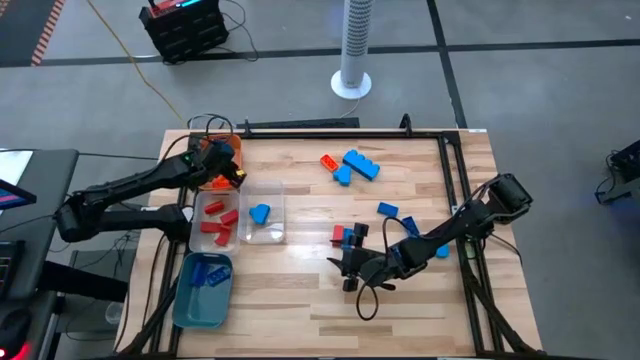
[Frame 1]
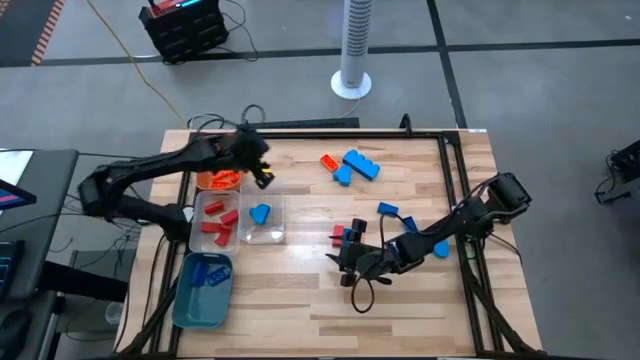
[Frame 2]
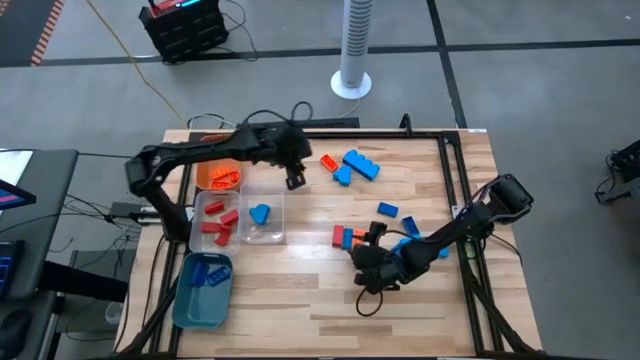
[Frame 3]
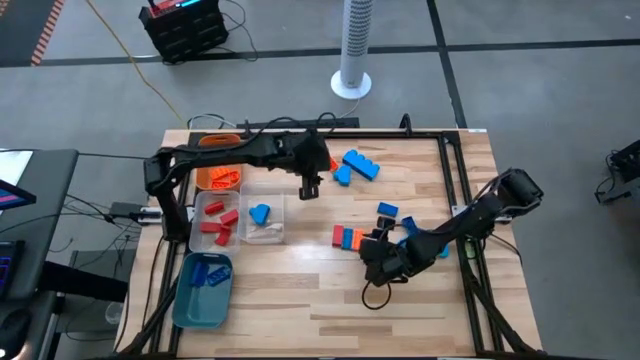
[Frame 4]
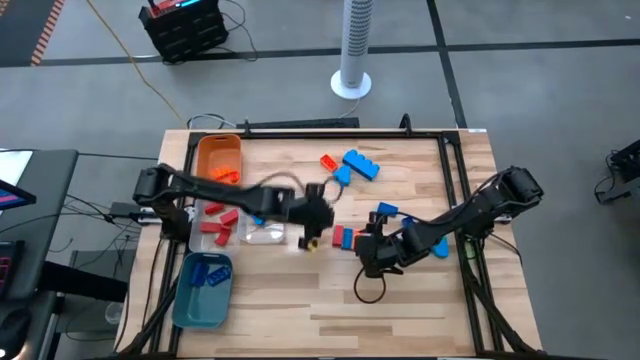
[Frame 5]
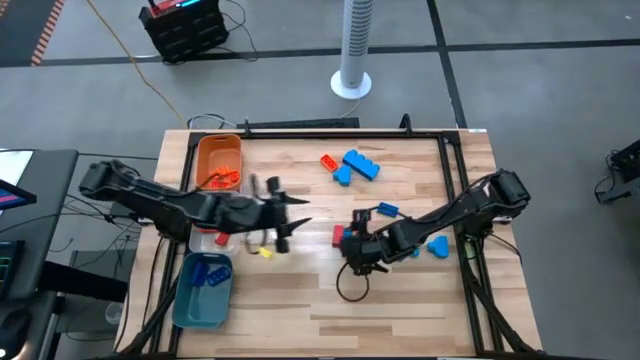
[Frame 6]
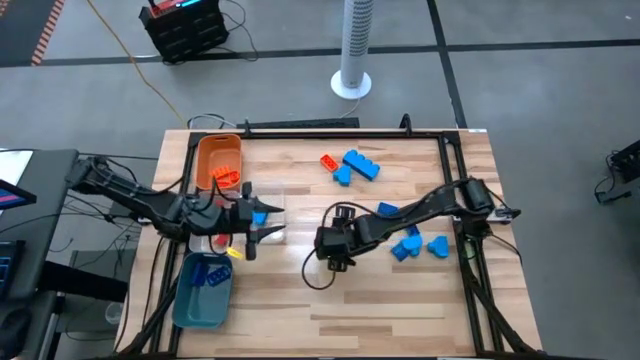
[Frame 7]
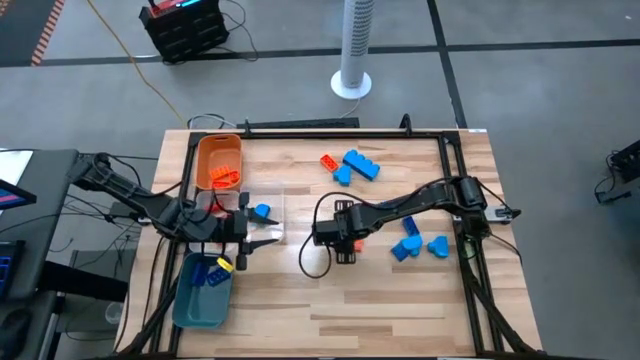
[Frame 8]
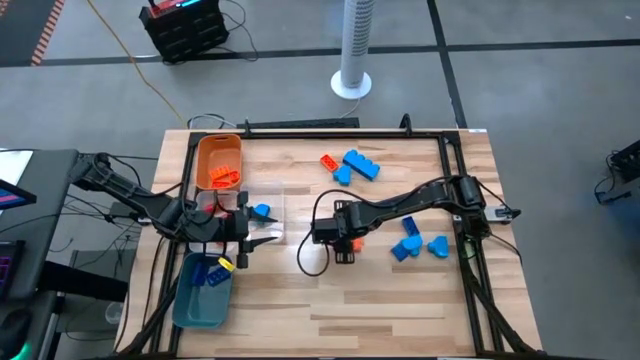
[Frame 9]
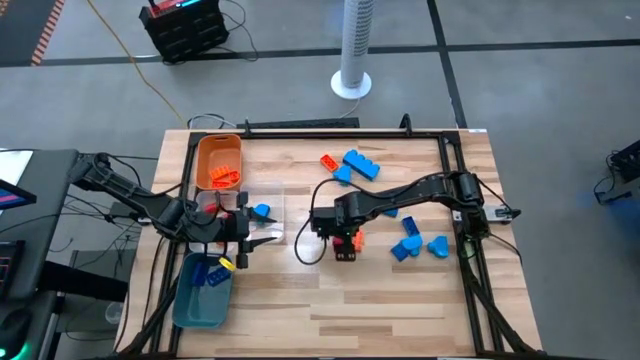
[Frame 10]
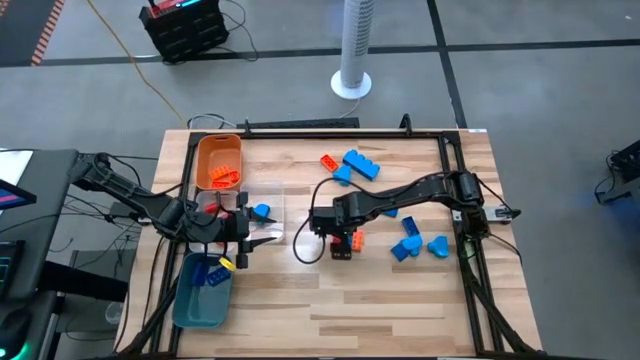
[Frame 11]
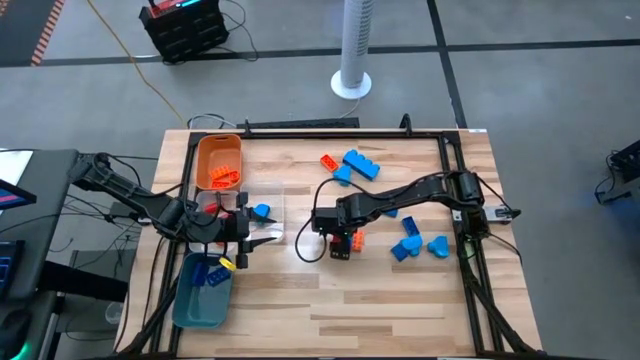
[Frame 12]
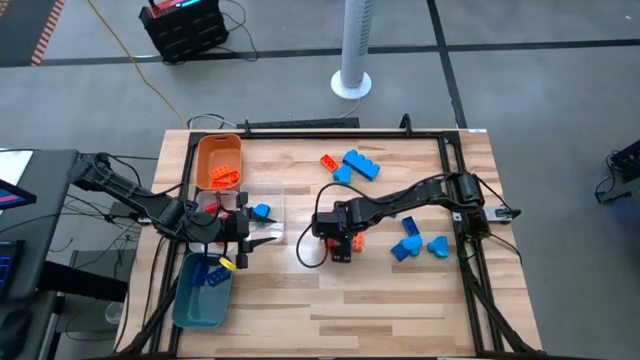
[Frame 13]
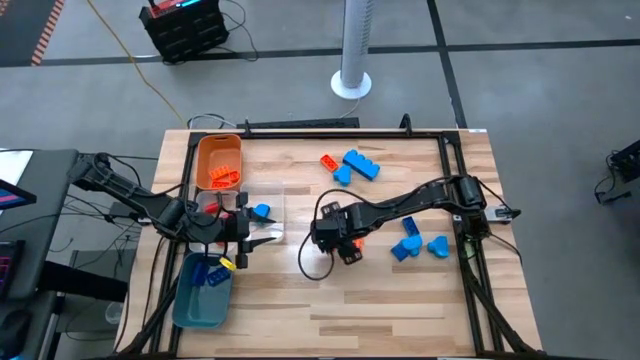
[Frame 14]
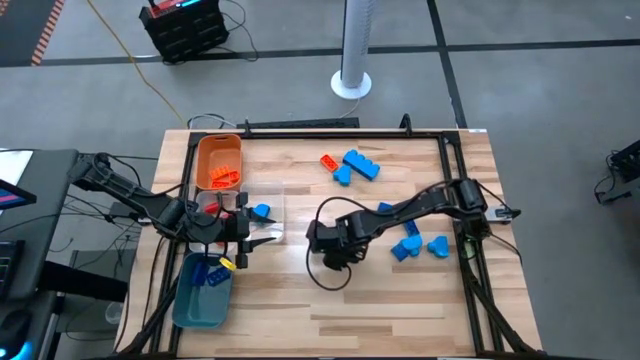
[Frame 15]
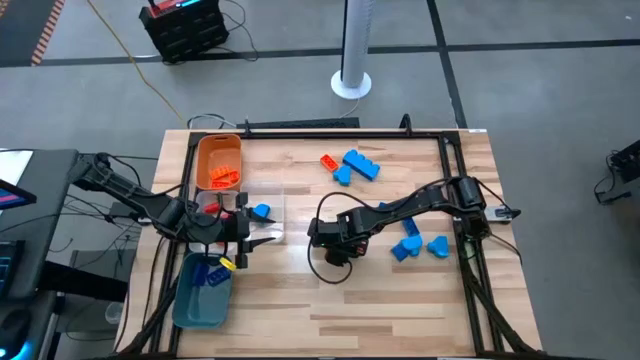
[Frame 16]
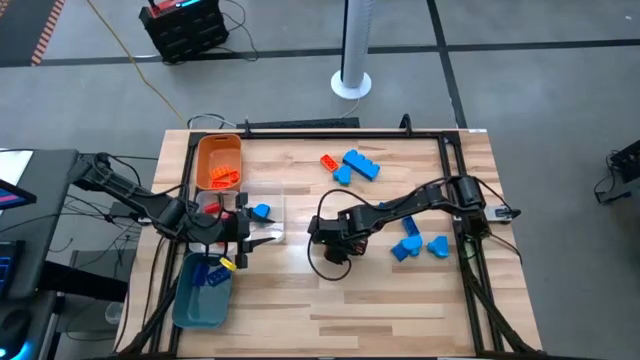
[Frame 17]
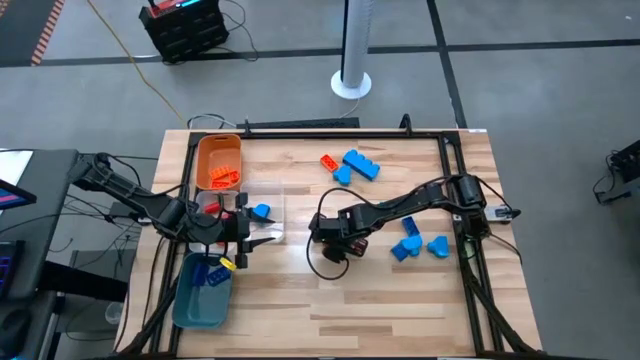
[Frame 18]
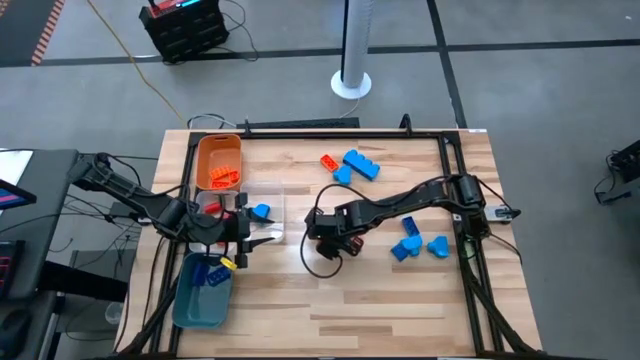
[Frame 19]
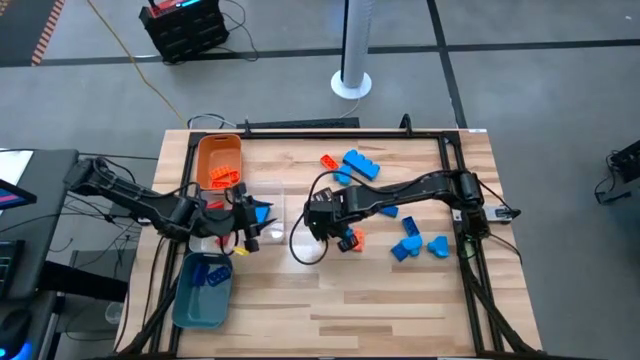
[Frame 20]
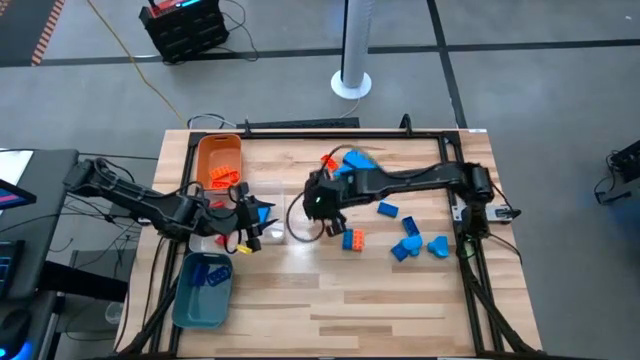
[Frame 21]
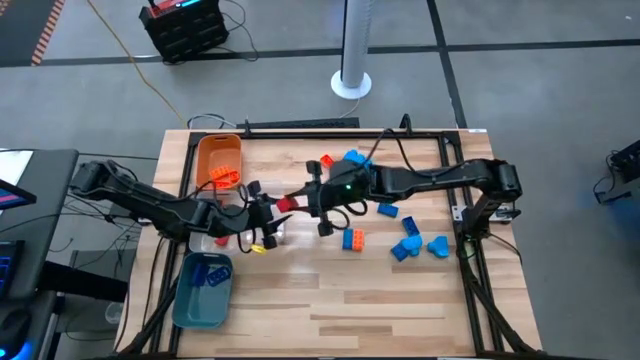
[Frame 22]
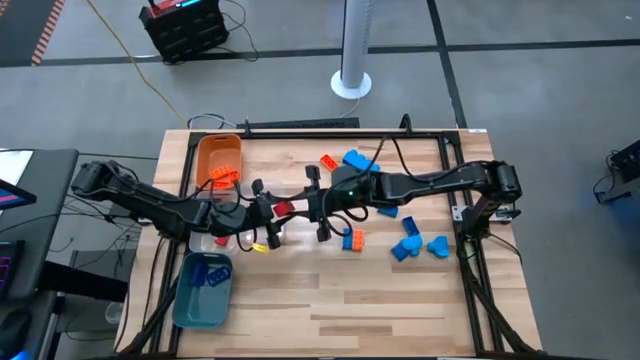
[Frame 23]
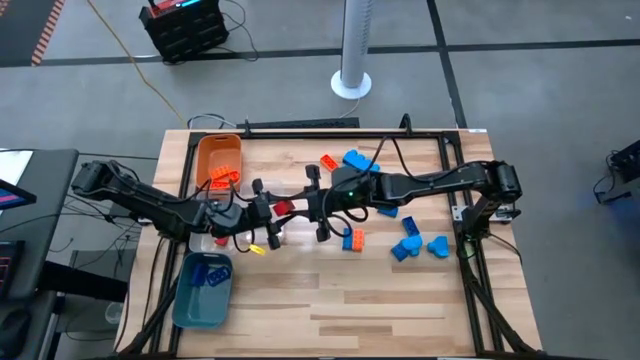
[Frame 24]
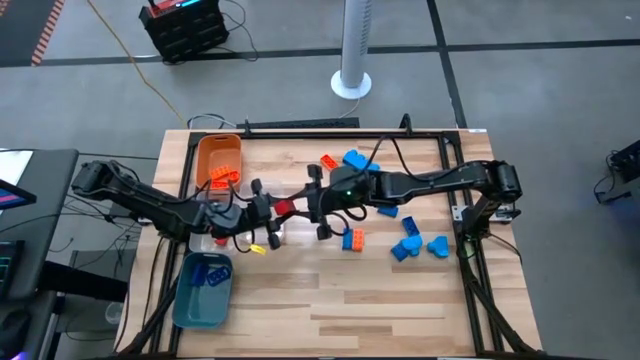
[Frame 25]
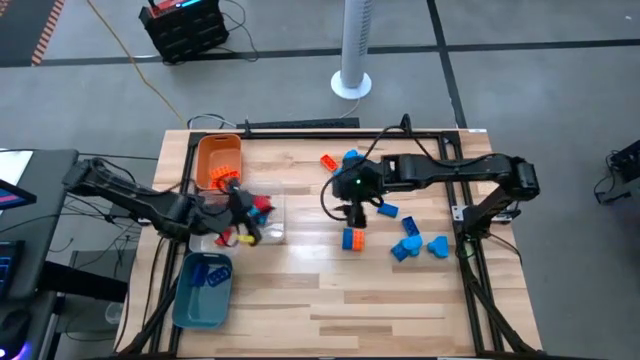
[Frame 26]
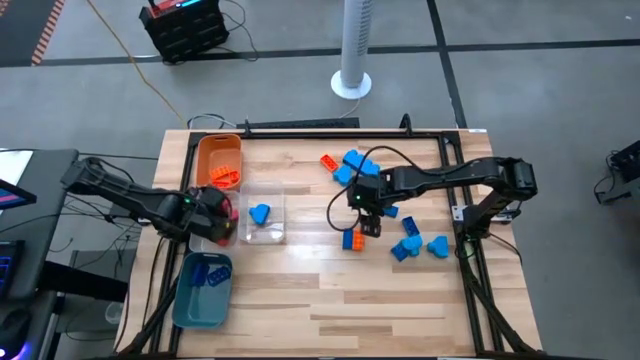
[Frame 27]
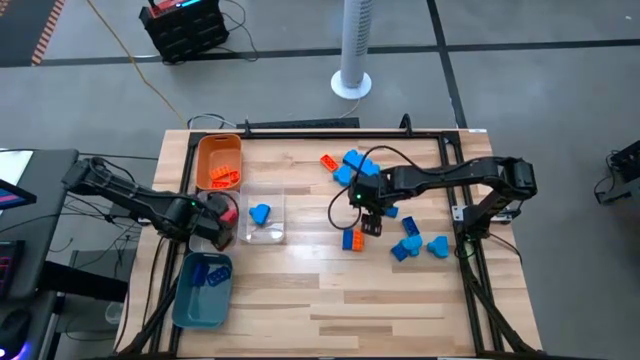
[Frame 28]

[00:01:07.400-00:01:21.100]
Task: Sort blocks
Put the red block into the left transparent bin

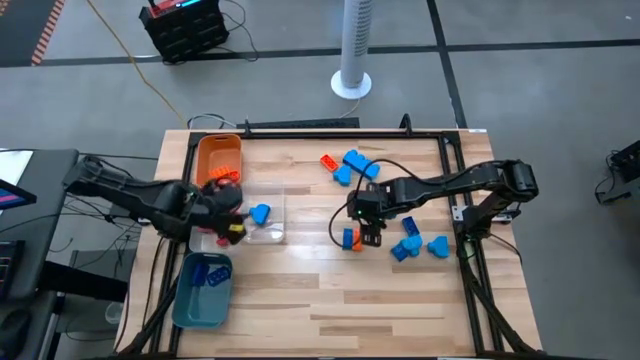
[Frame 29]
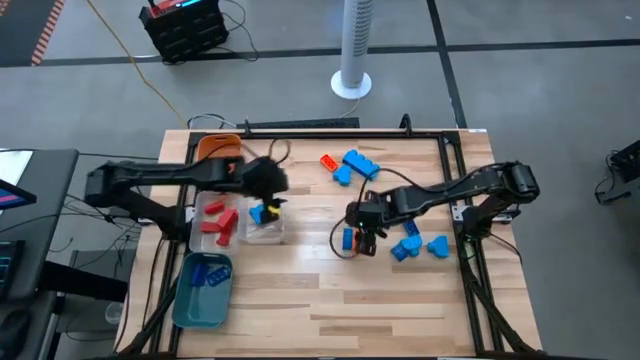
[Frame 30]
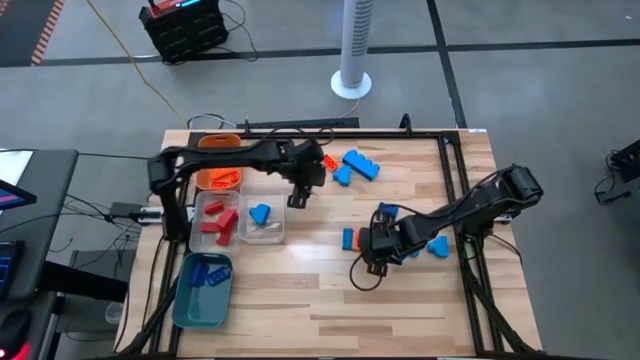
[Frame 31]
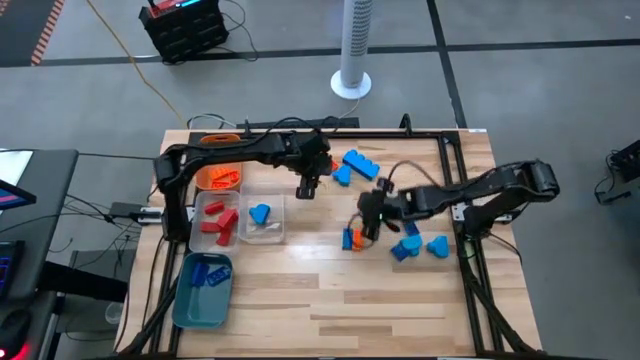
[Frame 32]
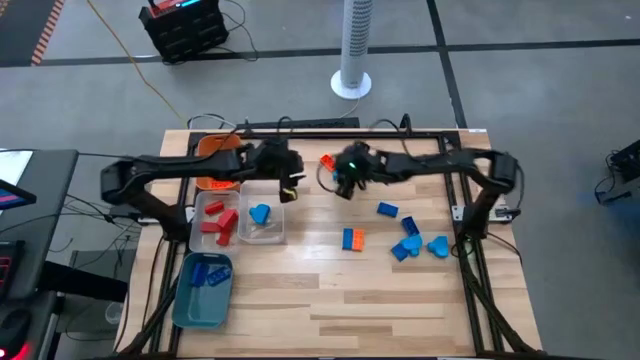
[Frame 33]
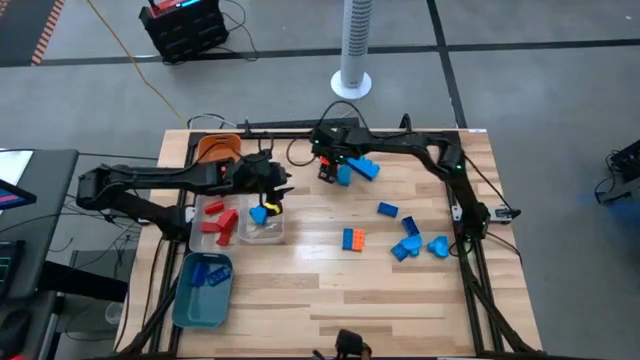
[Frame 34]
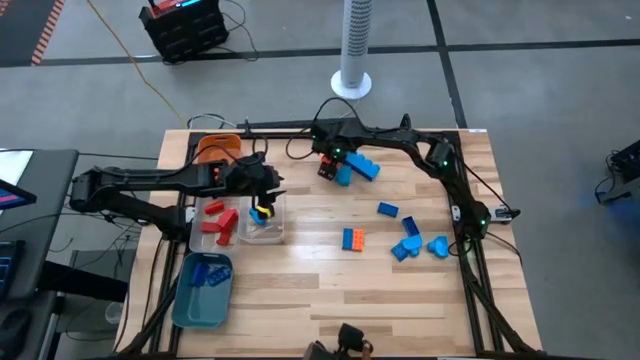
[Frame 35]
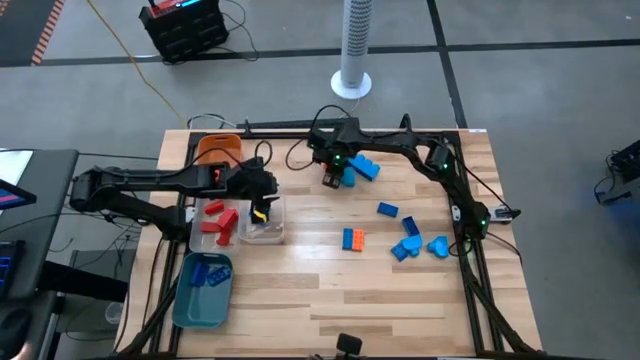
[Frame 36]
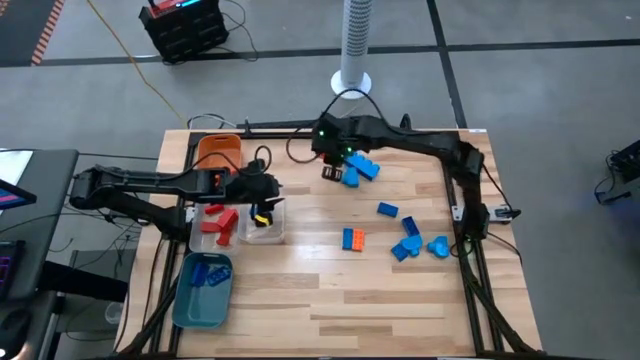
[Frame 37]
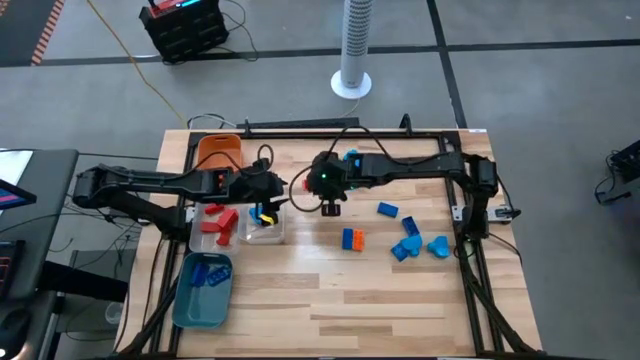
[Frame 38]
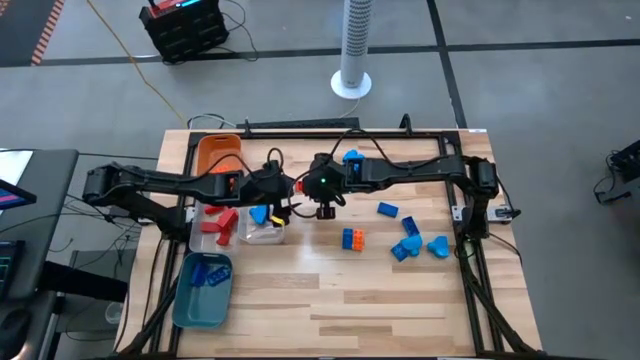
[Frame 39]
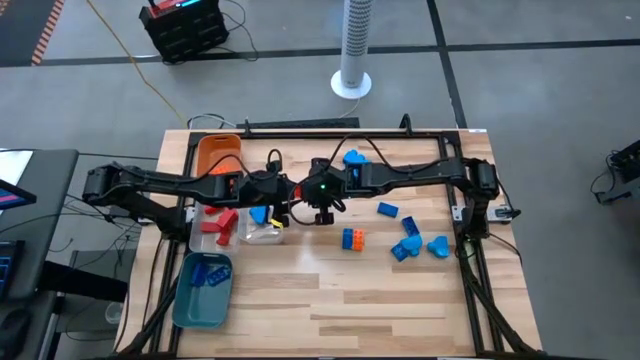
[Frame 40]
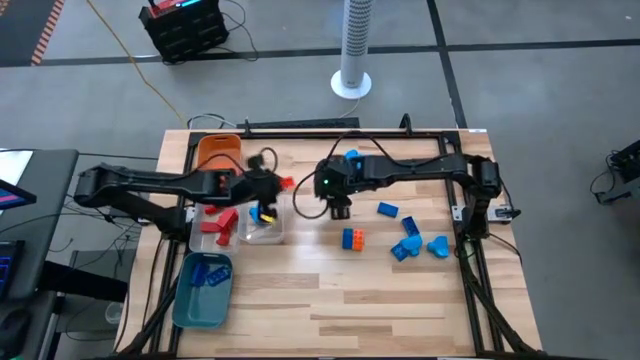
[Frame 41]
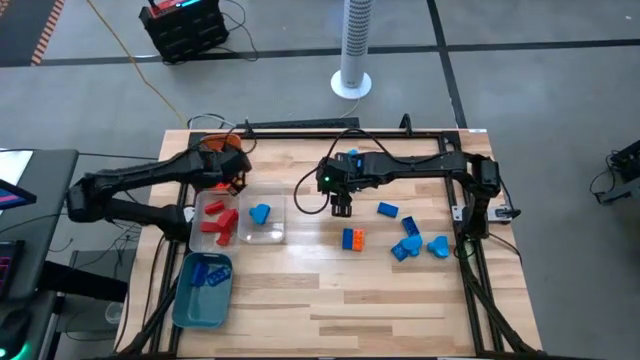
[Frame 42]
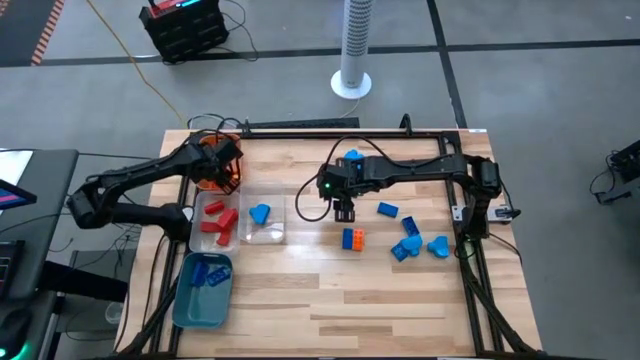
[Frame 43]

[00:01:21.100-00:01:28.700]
Put the orange game piece into the orange bin
